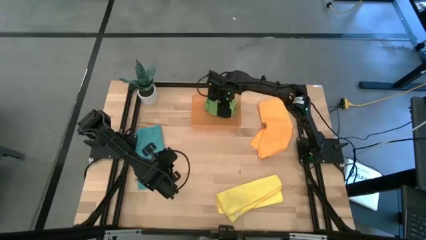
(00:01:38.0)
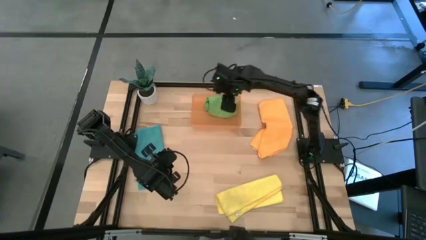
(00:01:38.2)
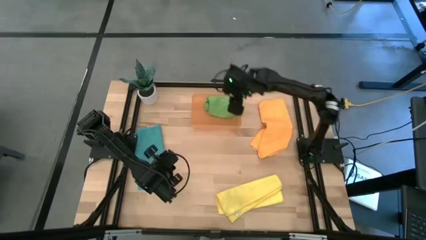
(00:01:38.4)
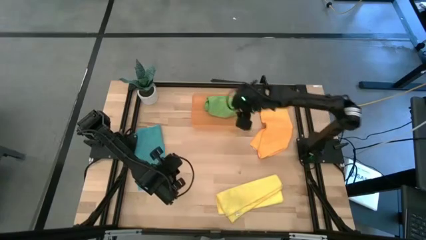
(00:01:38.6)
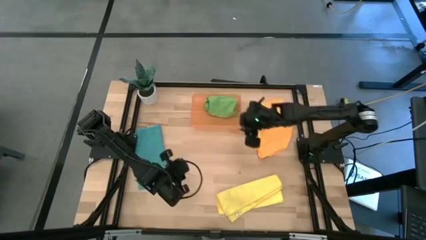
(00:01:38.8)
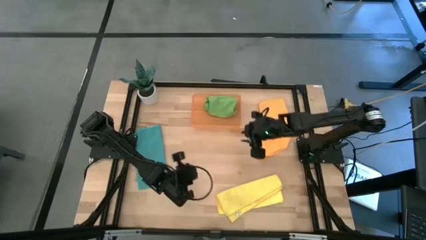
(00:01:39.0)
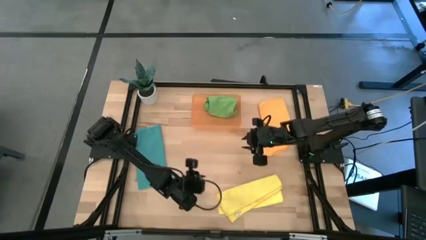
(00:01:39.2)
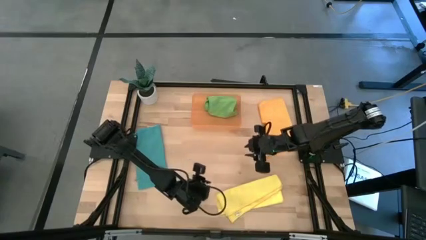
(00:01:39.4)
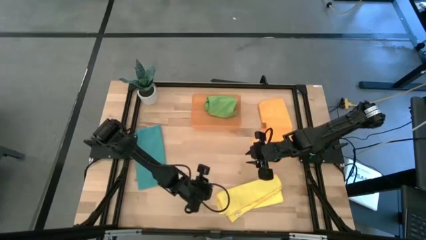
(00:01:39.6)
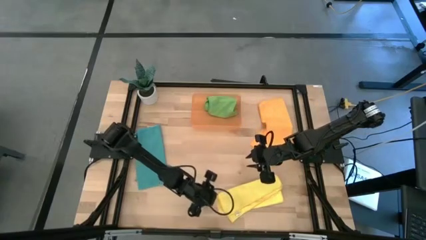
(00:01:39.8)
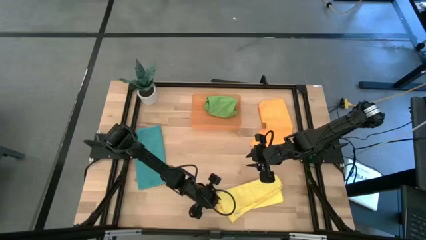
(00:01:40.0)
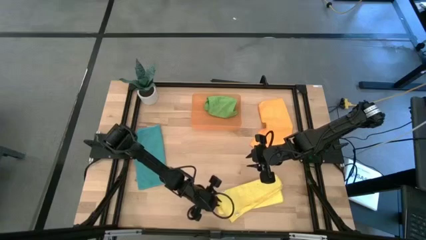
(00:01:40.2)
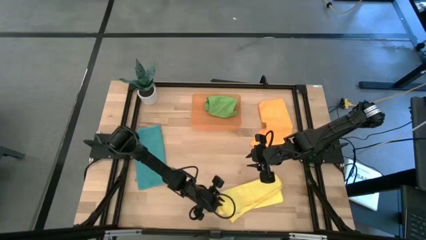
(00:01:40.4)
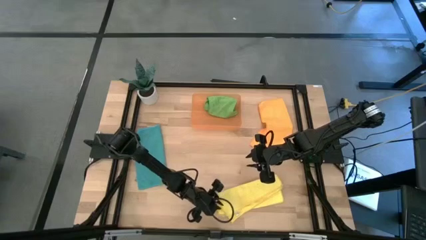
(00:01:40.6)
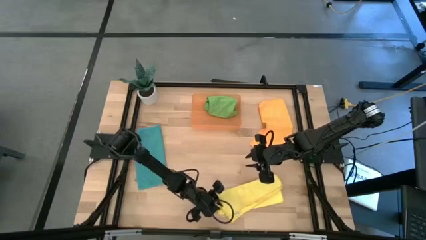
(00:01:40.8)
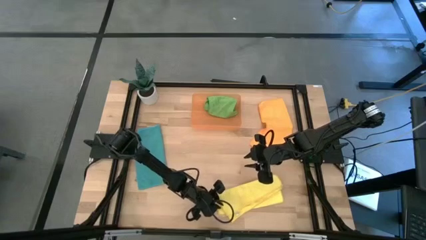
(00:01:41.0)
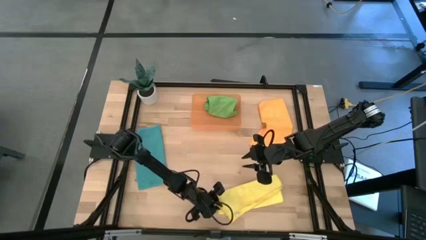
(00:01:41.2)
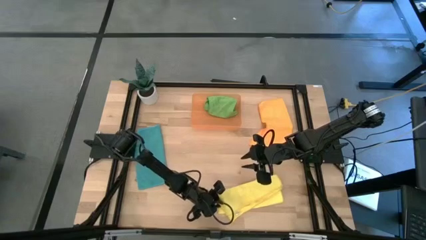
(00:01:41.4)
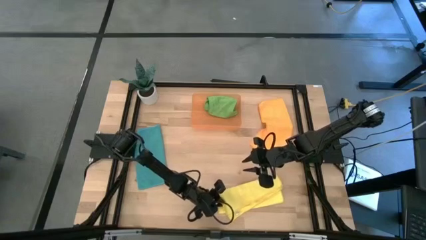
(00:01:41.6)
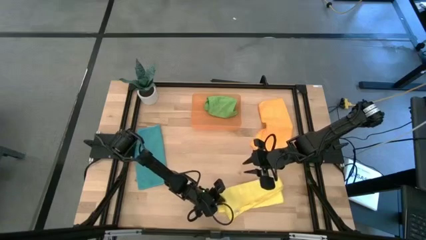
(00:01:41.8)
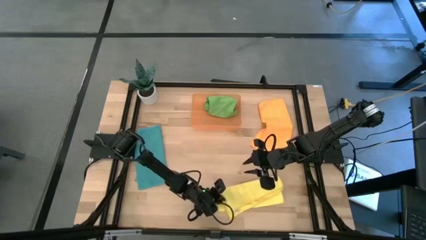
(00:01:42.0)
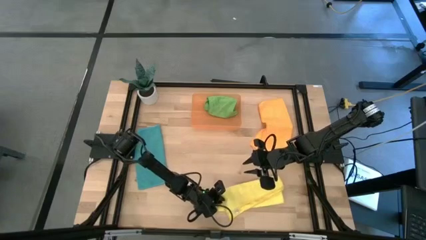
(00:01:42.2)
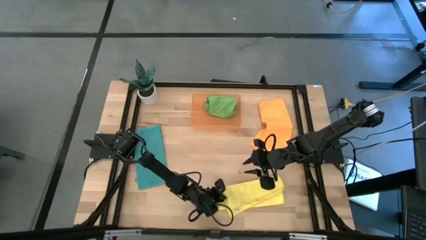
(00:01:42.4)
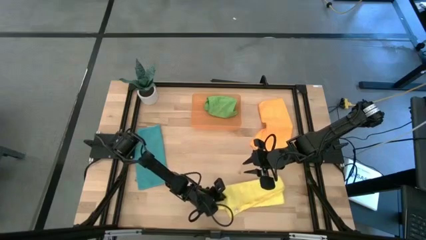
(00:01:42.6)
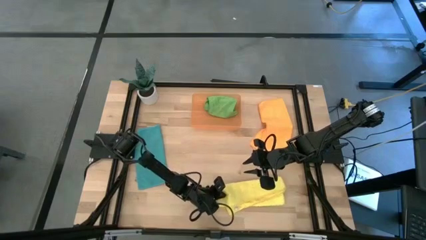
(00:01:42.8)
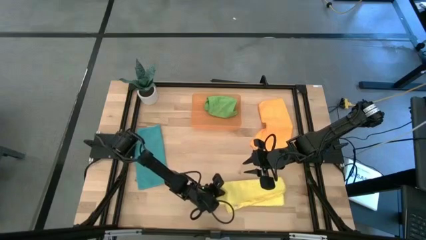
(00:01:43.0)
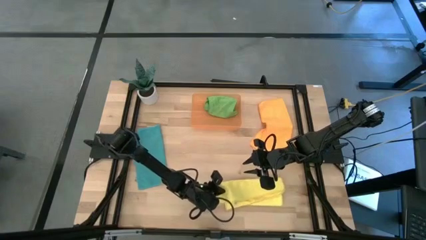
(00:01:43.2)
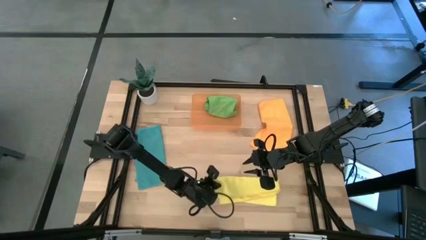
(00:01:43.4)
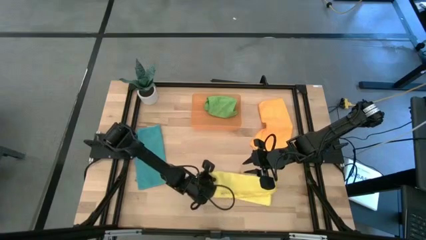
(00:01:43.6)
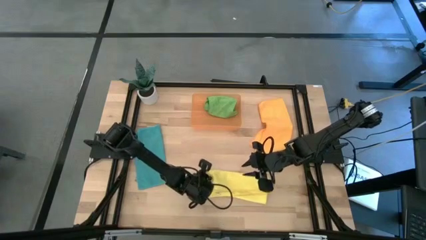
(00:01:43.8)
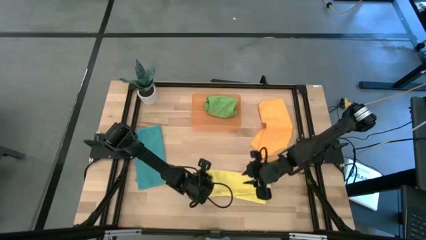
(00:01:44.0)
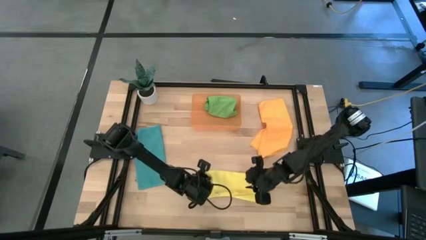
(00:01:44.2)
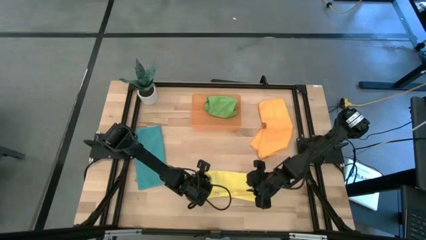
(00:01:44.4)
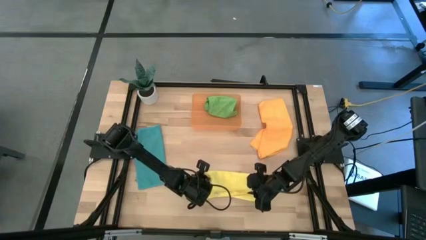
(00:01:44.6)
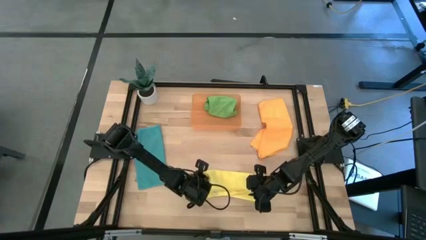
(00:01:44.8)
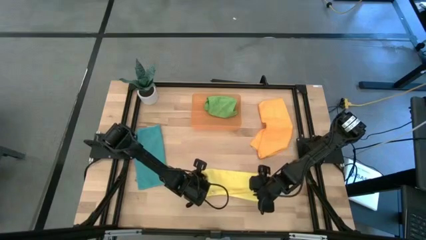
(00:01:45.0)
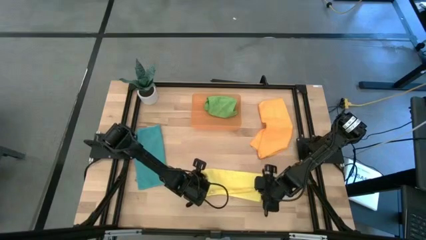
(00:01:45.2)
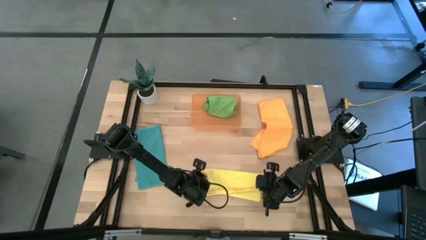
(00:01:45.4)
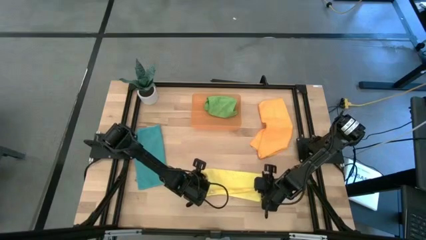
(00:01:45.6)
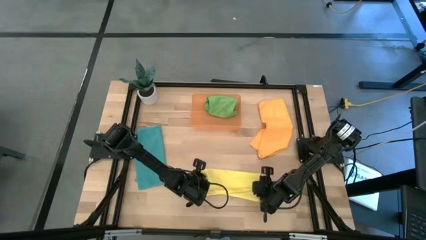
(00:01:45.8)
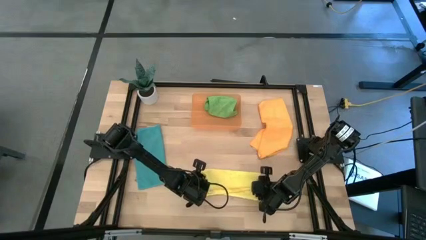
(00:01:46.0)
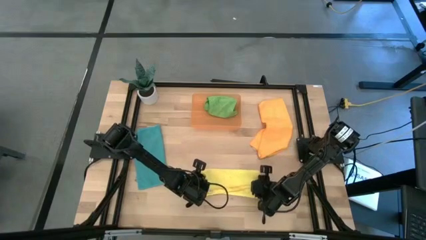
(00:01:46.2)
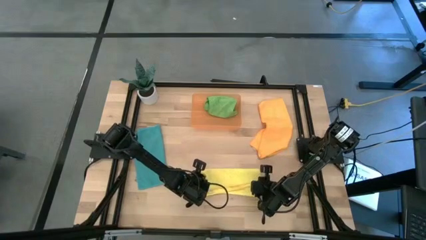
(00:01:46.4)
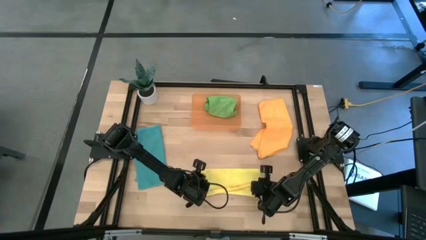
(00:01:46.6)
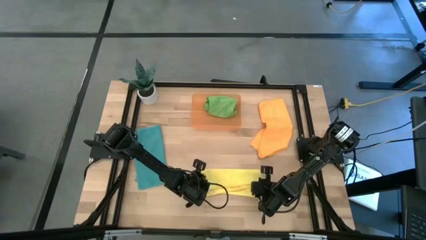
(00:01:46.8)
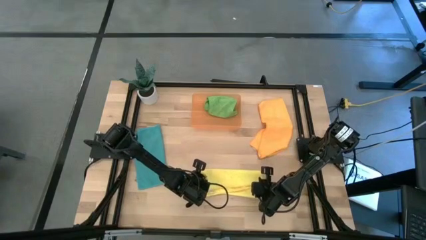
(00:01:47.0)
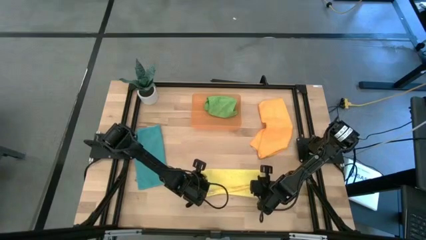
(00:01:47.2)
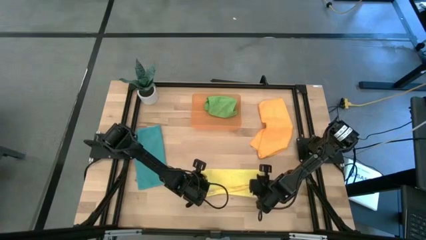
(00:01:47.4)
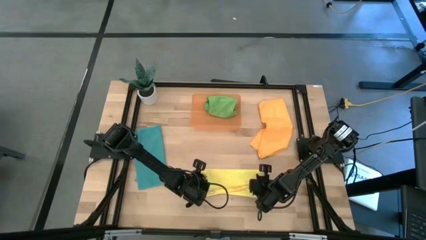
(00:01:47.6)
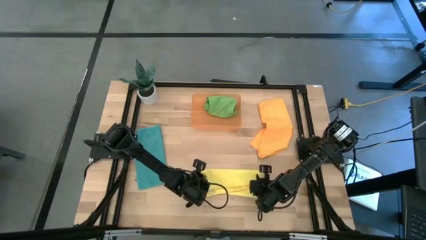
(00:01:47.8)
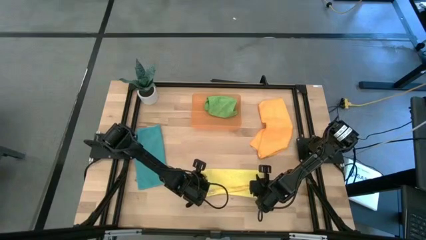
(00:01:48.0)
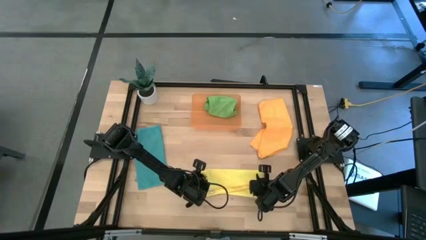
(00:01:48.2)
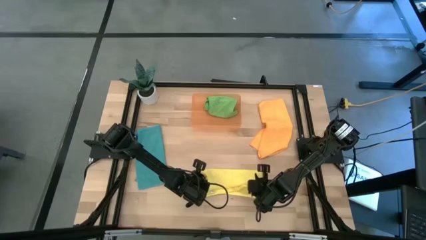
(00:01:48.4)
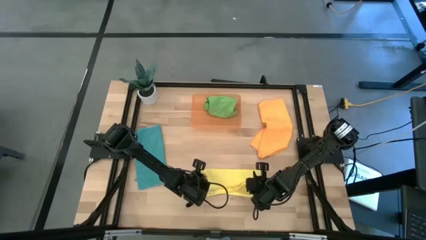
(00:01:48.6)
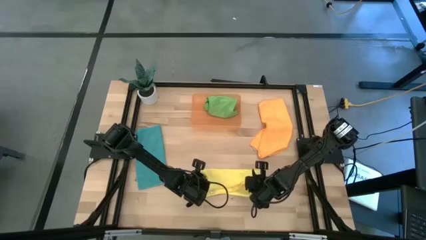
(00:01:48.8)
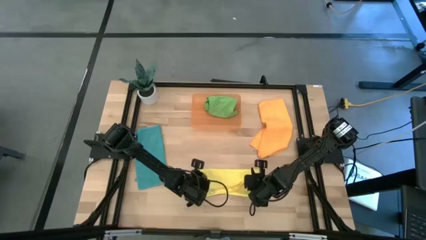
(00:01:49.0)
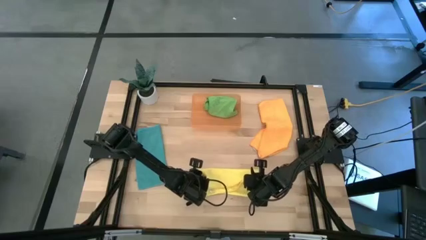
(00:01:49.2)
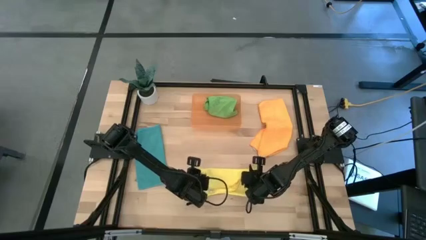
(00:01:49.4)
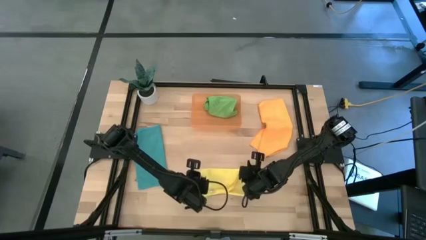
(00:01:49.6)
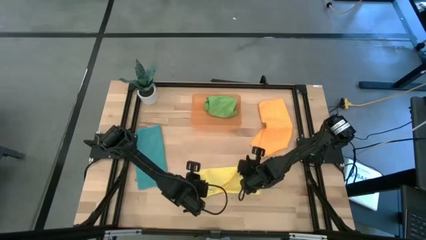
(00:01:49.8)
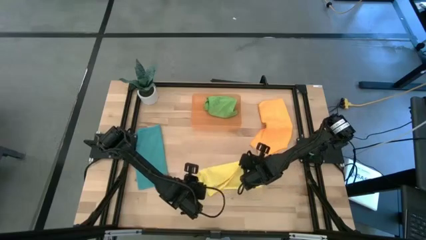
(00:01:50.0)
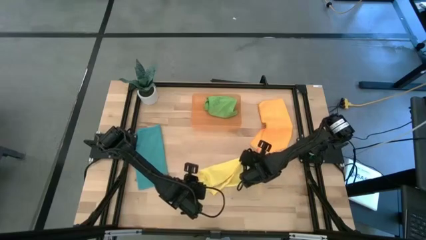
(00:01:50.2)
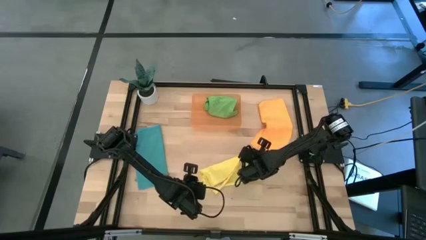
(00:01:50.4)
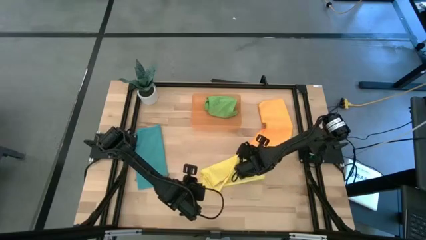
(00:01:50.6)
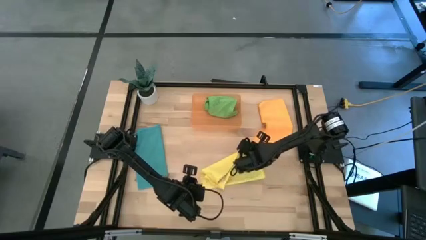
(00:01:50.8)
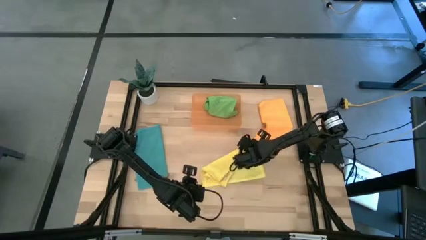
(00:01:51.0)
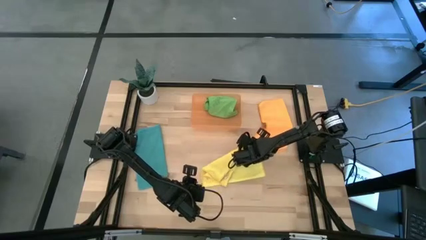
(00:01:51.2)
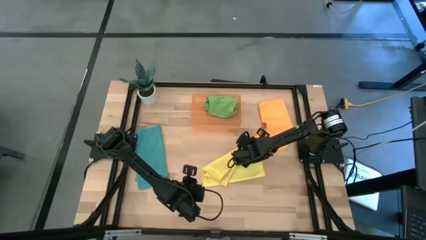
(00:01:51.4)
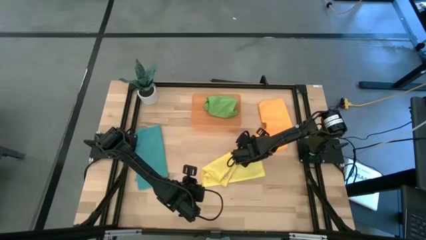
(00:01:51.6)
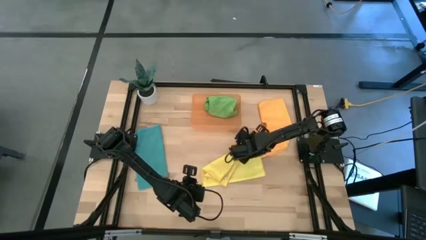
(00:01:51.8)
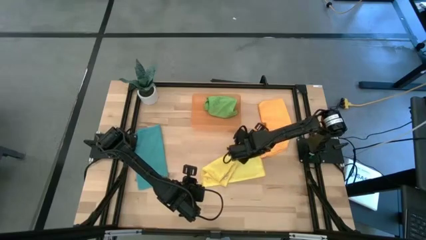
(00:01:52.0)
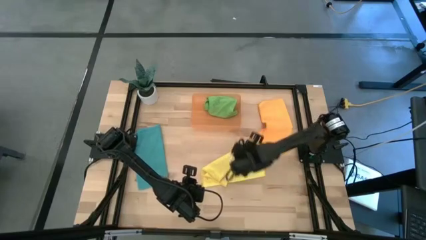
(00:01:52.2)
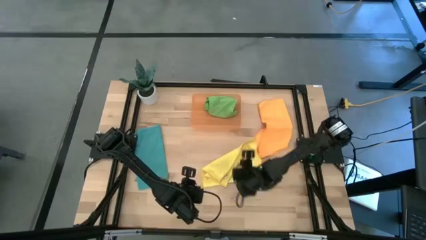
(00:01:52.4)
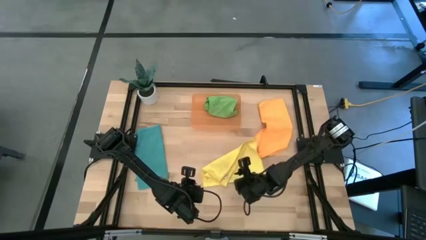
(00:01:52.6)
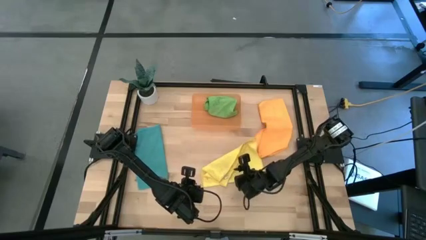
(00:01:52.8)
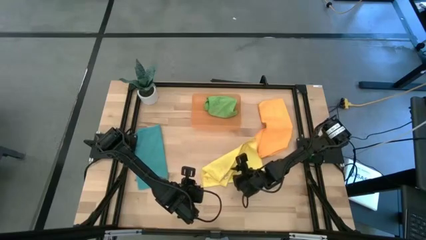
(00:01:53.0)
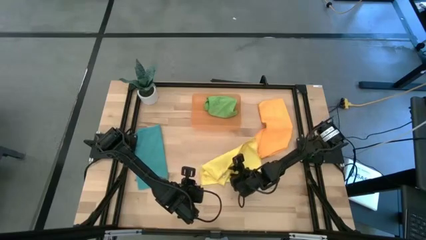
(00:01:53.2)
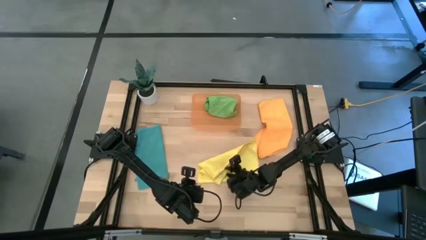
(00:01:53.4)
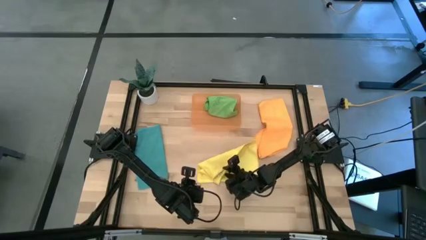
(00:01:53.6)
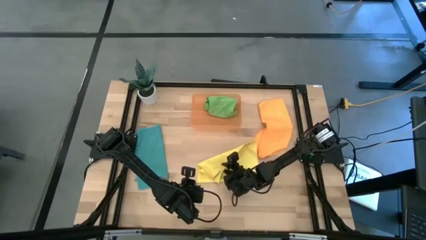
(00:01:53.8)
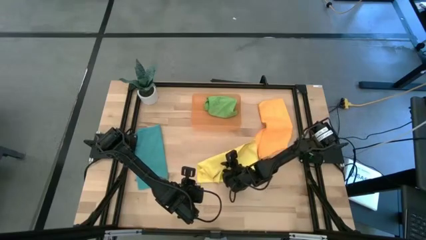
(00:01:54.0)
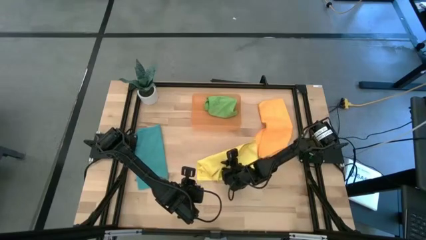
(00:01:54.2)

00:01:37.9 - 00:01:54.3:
Task: Roll microfiber towels into tight, uniform cylinder then place into a basket
Fold the yellow microfiber cloth

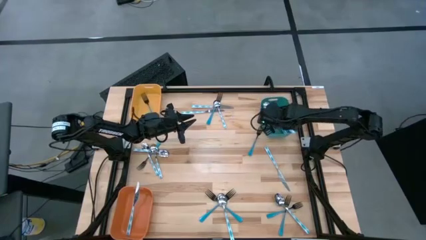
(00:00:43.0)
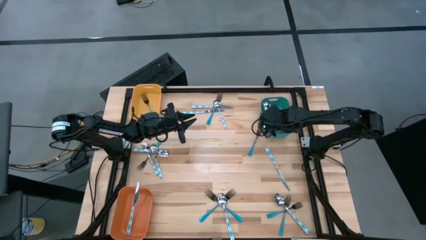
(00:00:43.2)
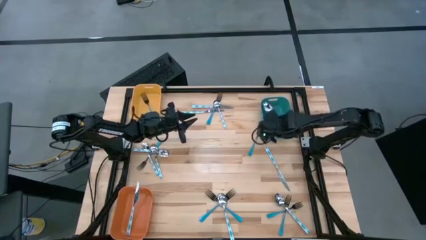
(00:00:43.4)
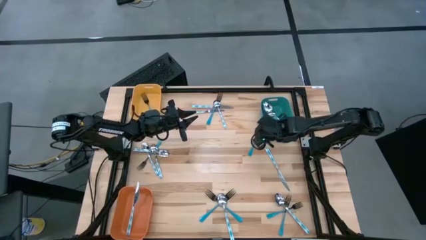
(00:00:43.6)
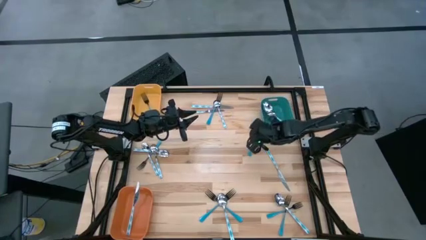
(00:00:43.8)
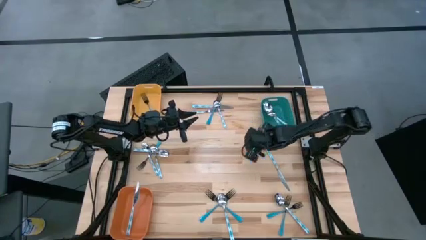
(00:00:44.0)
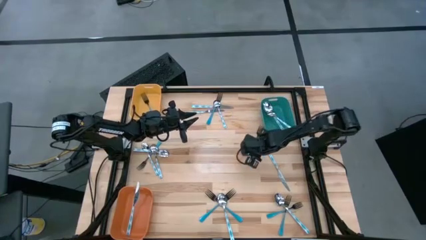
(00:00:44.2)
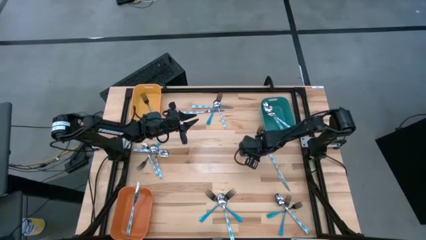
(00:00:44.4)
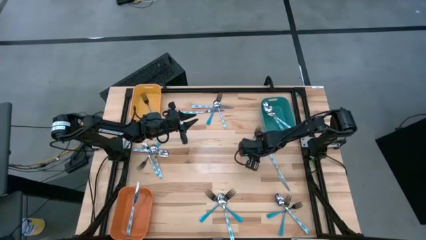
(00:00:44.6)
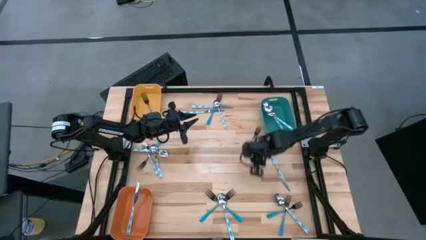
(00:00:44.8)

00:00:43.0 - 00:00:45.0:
Task: Sort silverware by color (type)
Put the blue fork into the yellow bin
